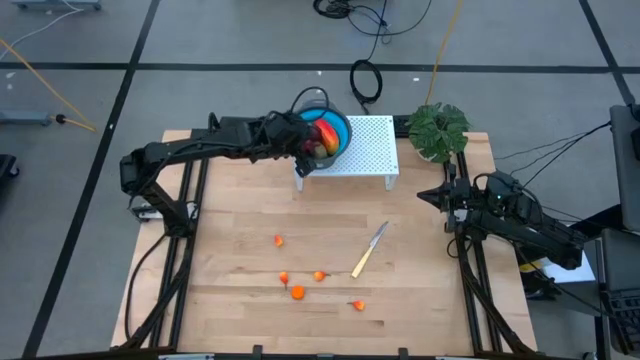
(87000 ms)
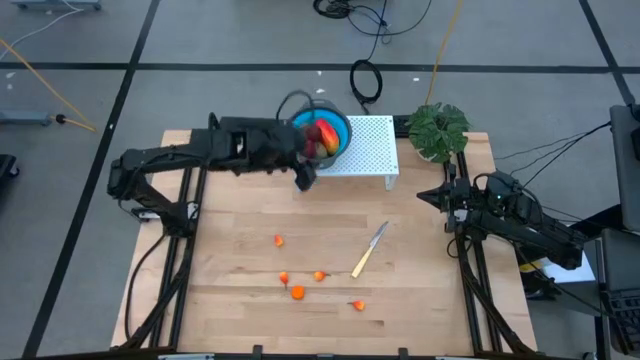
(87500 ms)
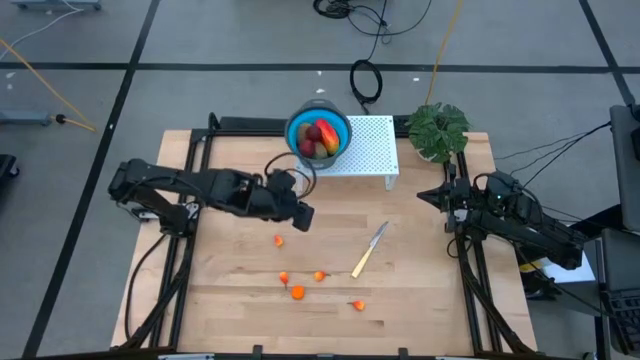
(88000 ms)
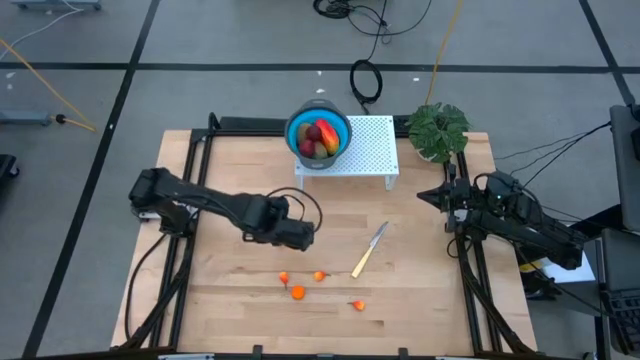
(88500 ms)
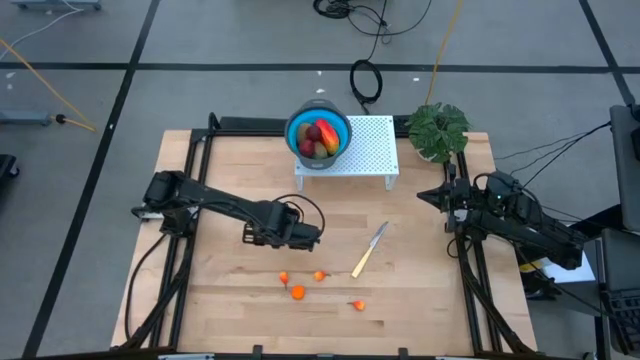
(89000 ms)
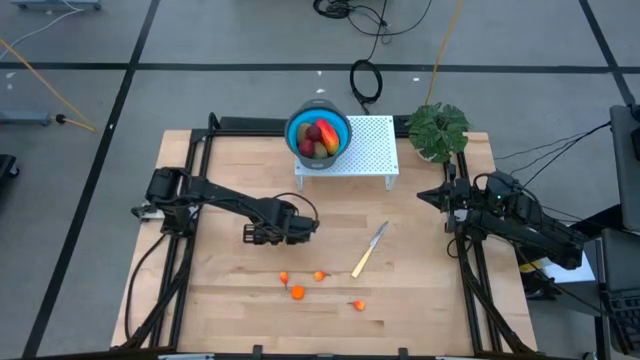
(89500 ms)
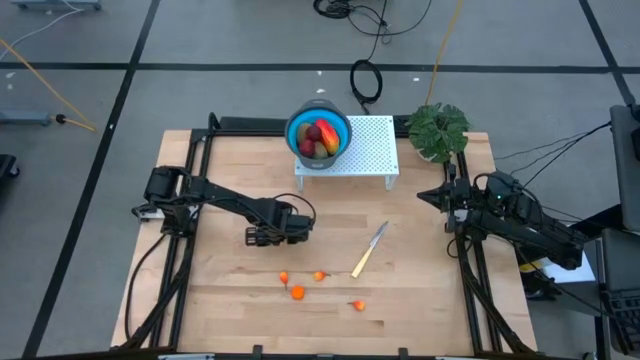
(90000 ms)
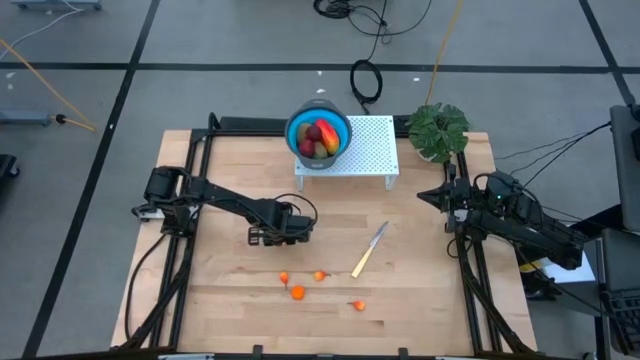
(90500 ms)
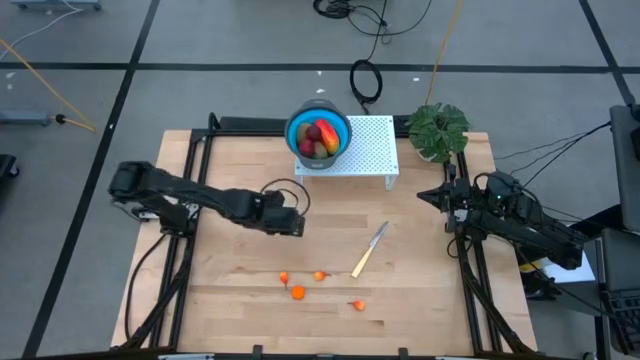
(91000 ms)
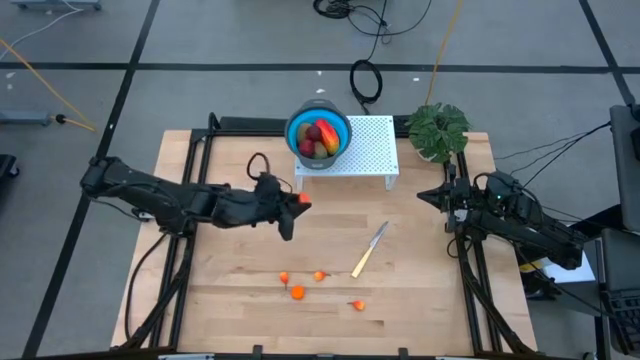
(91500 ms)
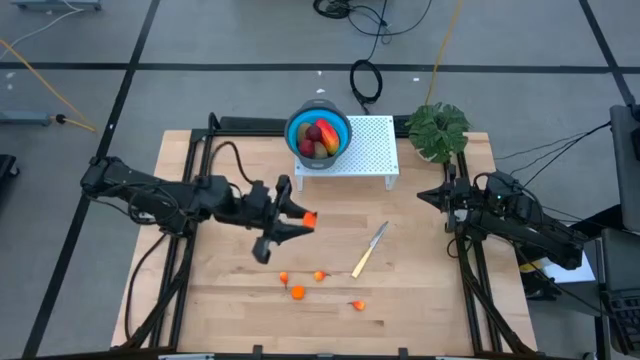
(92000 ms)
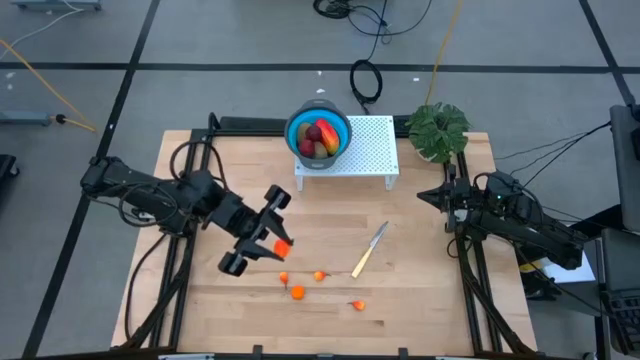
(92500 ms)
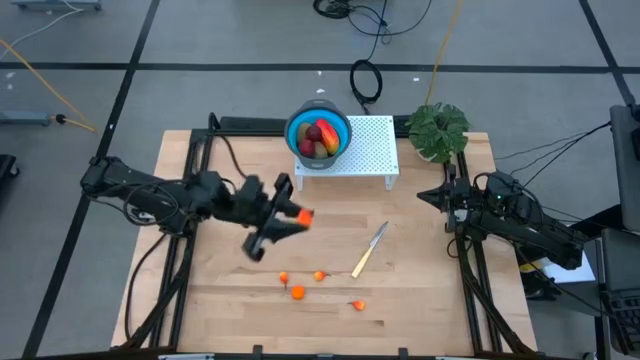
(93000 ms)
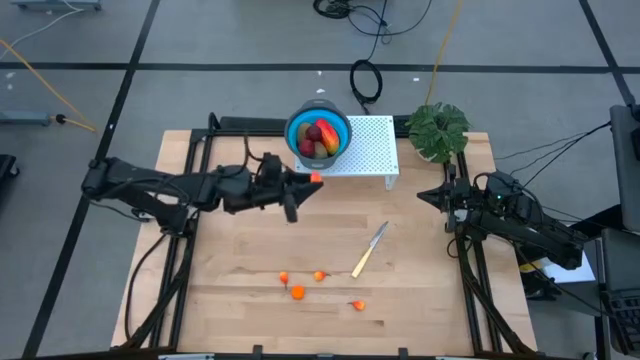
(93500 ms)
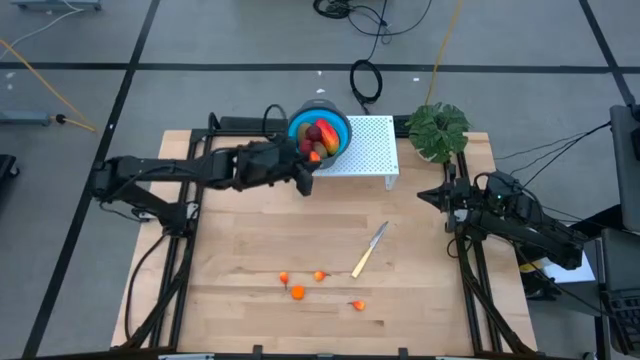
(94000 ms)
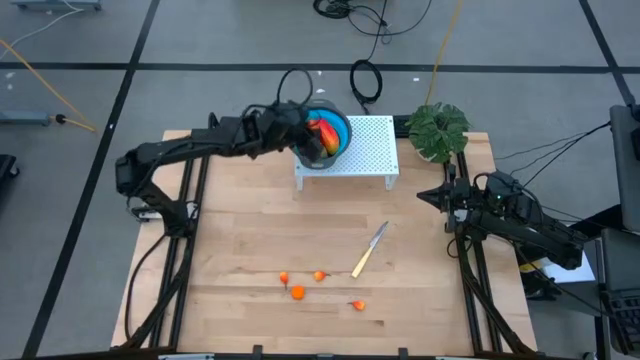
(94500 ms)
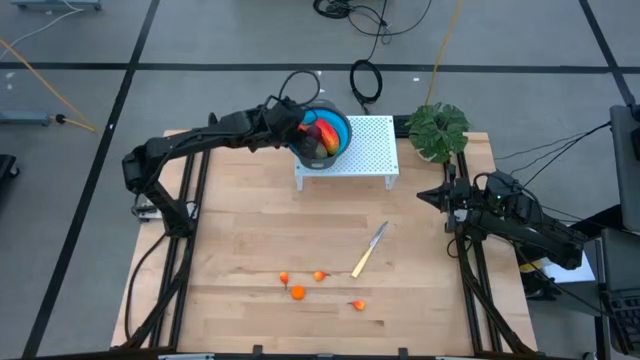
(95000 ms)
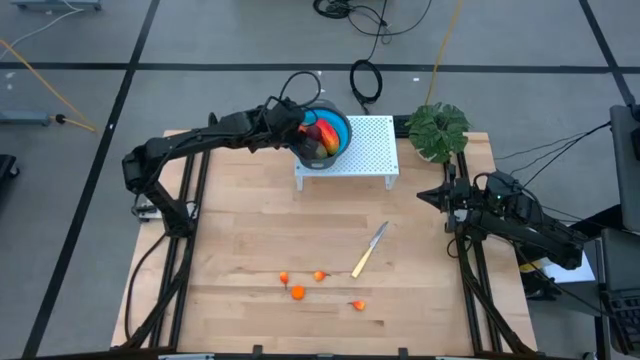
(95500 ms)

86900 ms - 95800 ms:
Task: Pick & Place Fruit
Put the orange peach into the blue strainer bowl on the shelf

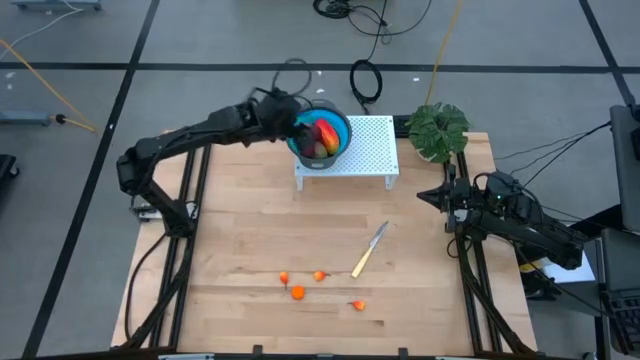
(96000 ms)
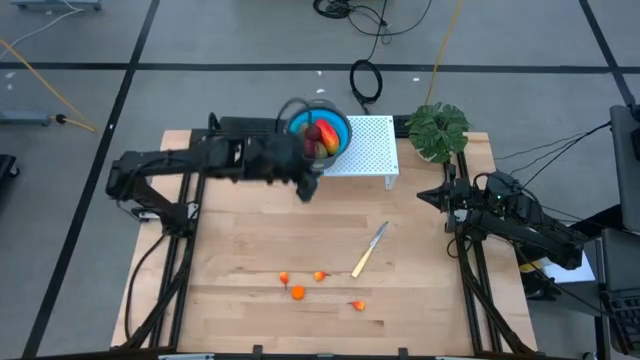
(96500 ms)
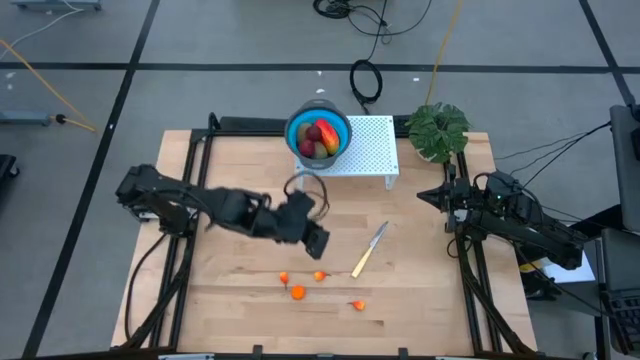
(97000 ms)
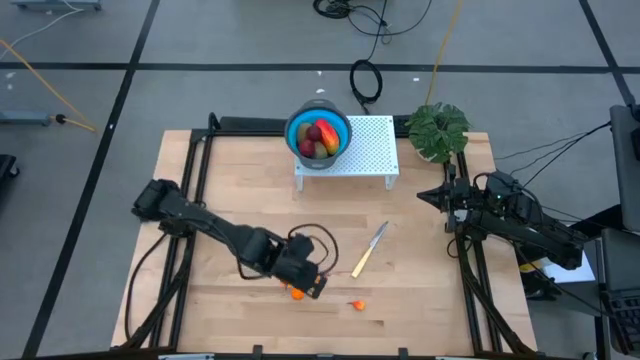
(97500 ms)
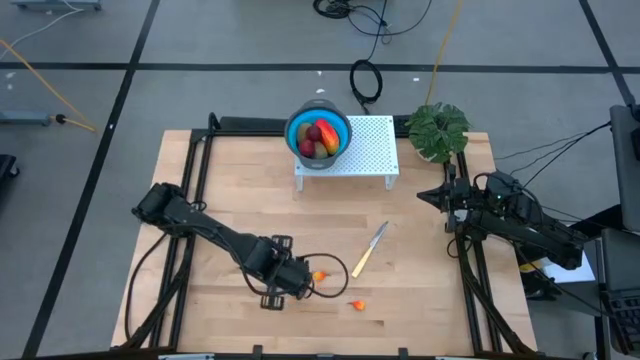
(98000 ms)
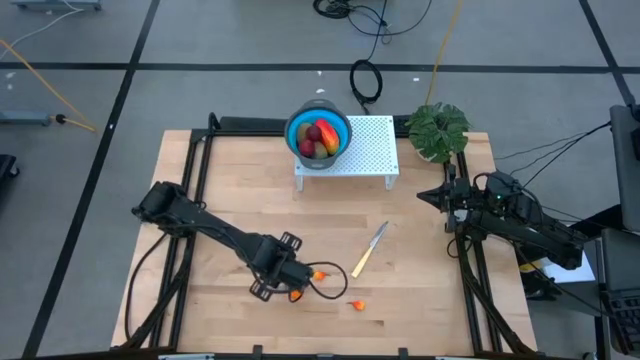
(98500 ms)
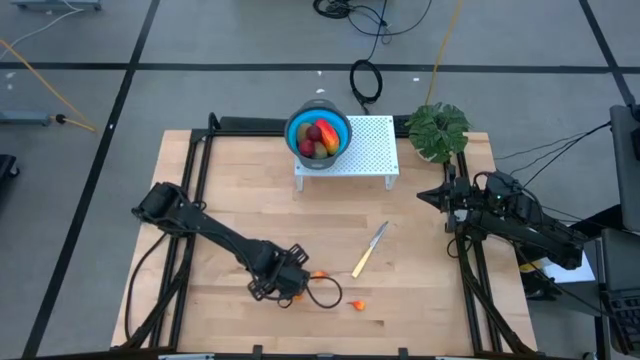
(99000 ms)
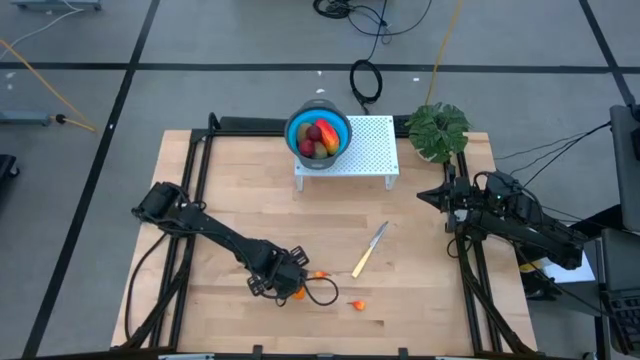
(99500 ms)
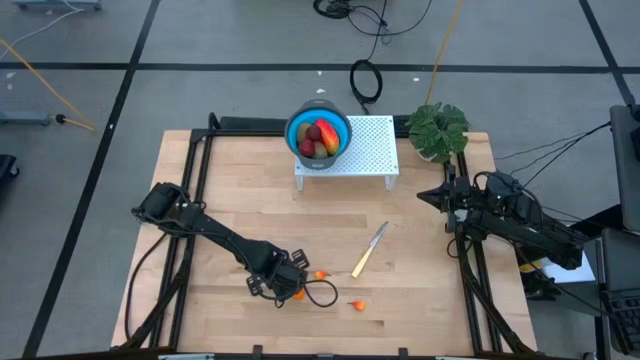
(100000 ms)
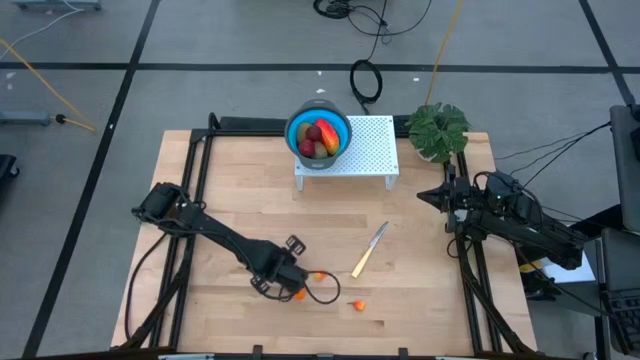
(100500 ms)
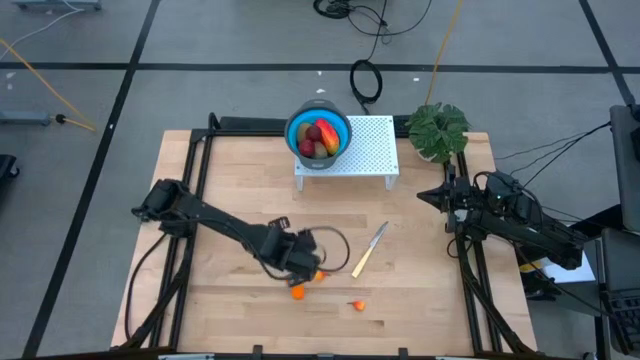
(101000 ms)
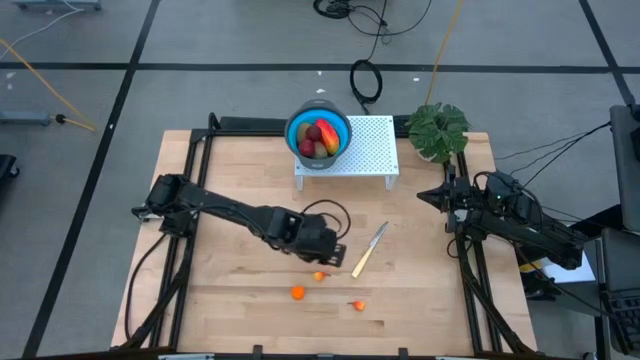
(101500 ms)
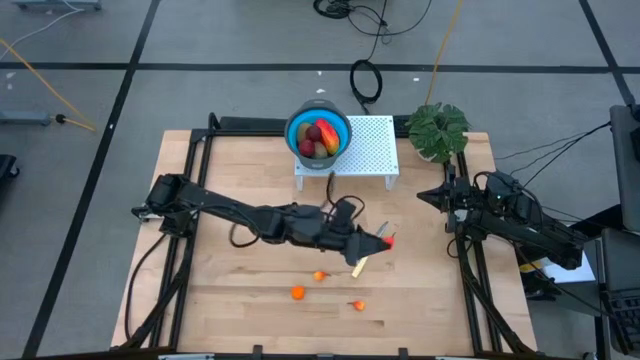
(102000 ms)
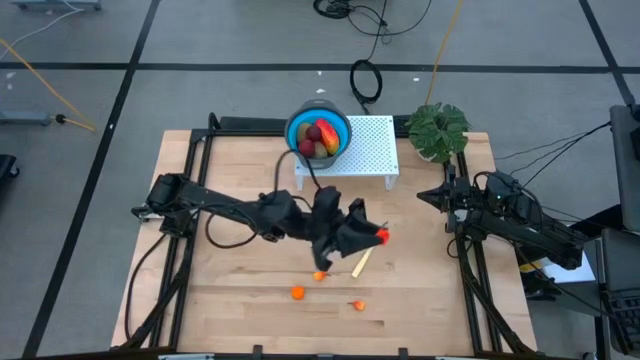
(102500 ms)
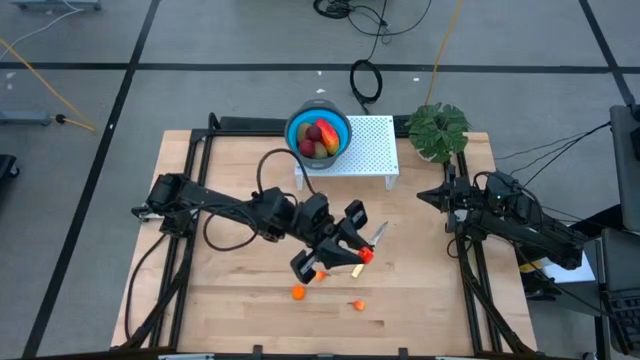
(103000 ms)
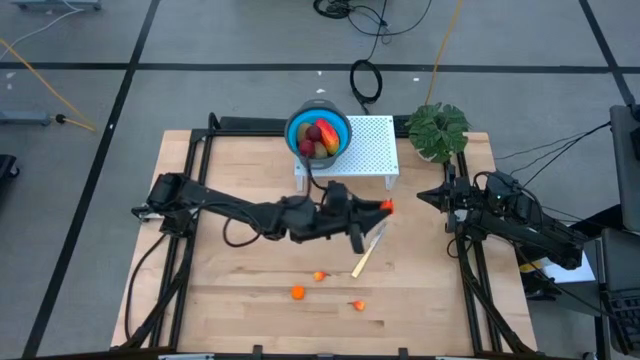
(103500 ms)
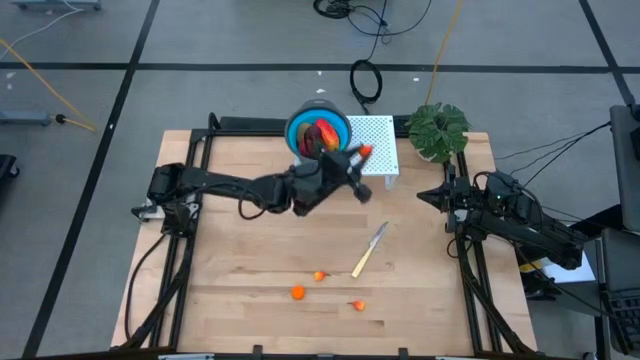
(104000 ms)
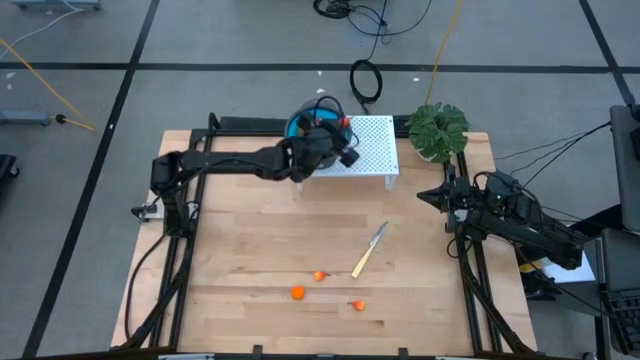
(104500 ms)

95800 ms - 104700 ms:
Put the orange peach into the blue strainer bowl on the shelf

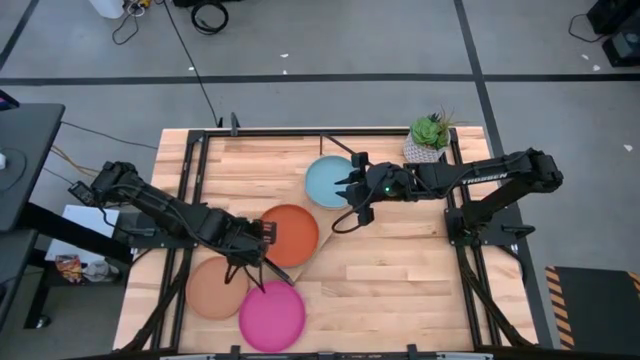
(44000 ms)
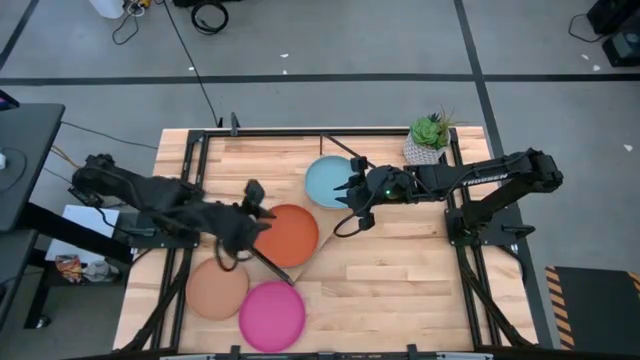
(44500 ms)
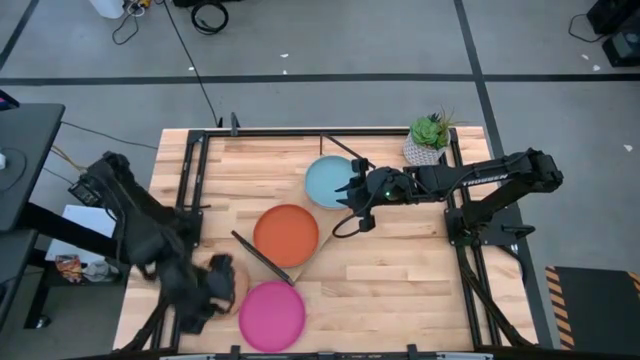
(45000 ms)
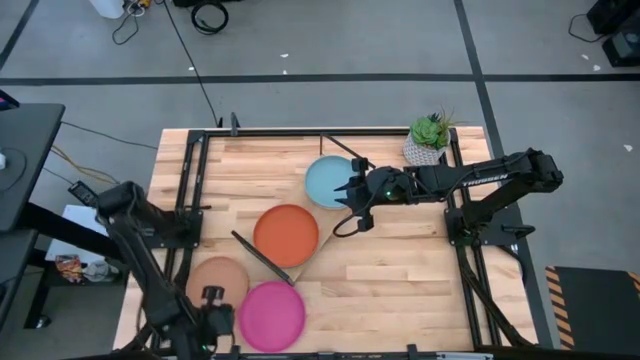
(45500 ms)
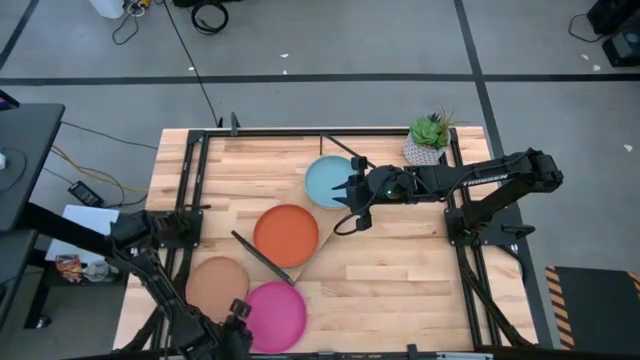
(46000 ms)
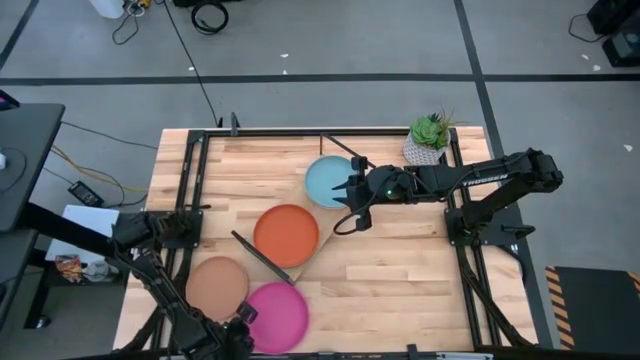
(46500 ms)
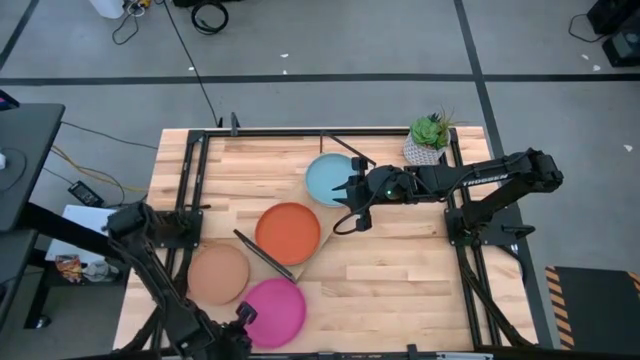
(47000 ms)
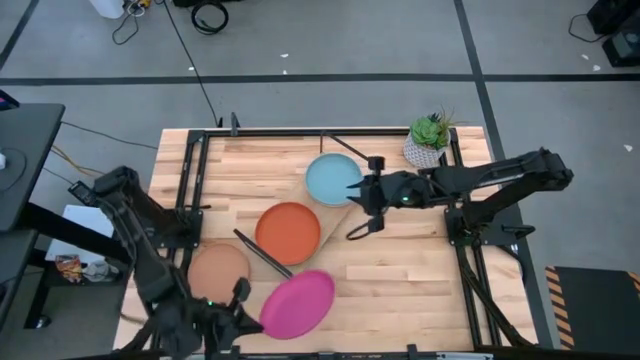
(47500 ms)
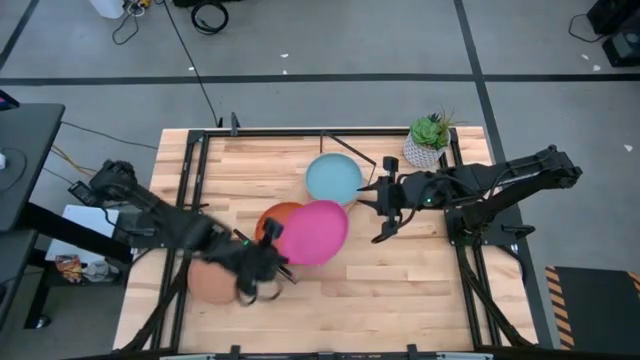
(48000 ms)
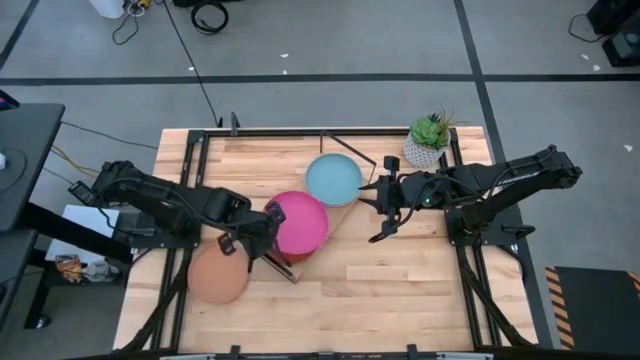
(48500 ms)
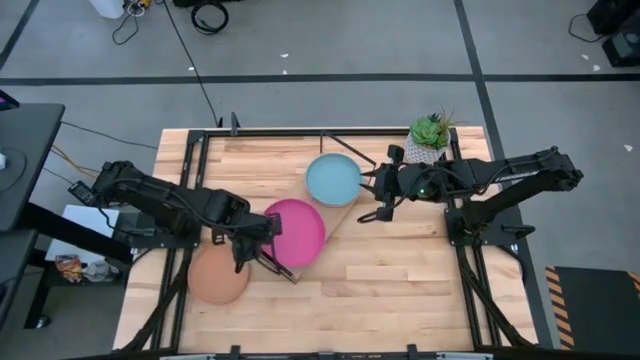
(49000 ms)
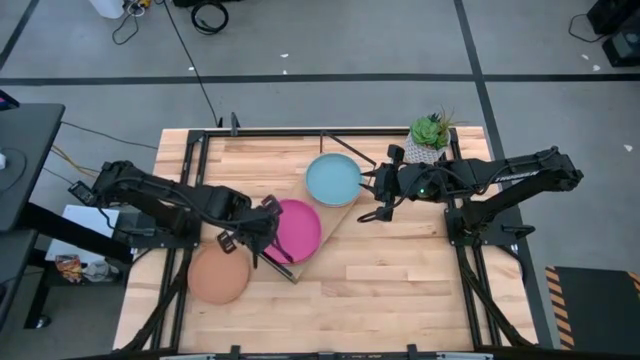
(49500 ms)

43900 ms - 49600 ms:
Task: Place and stack plates onto a shelf
Stack the pink plate on top of the orange plate on the shelf
